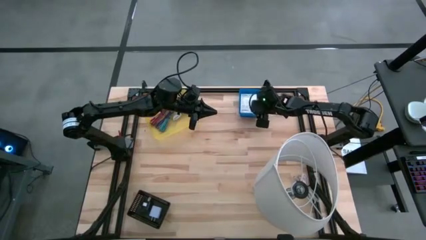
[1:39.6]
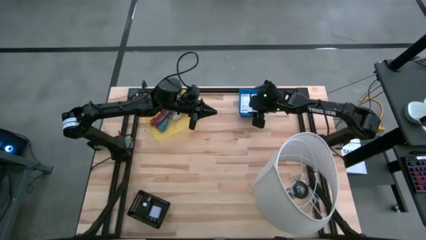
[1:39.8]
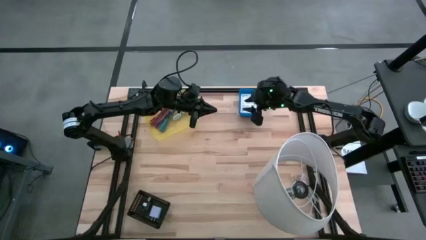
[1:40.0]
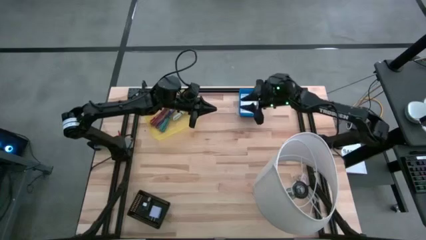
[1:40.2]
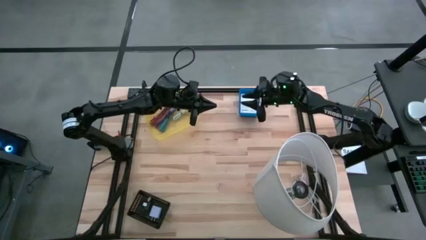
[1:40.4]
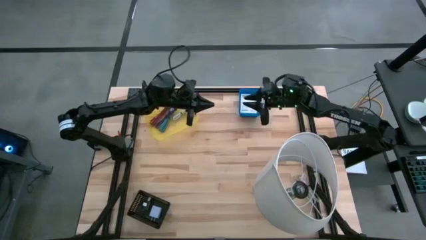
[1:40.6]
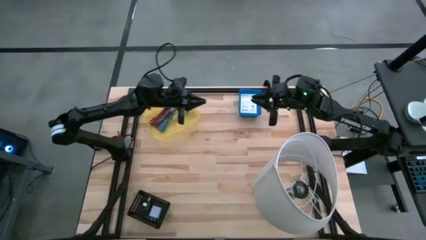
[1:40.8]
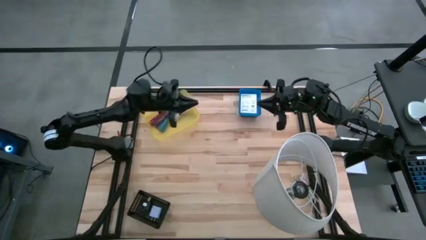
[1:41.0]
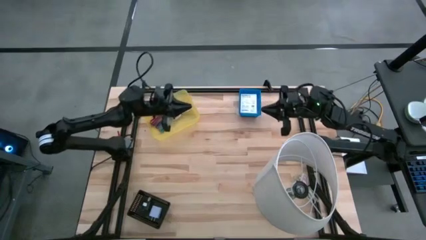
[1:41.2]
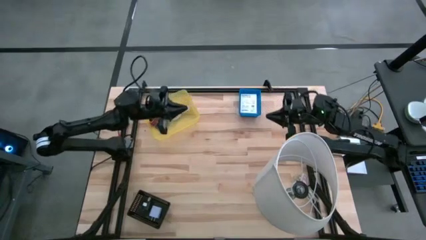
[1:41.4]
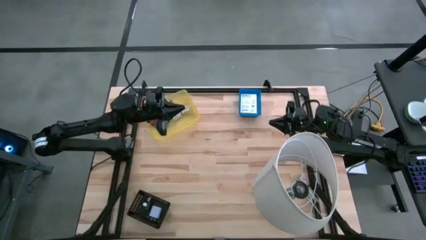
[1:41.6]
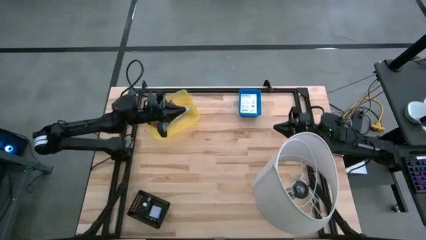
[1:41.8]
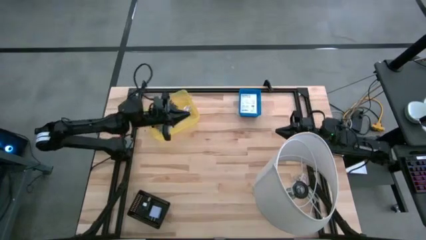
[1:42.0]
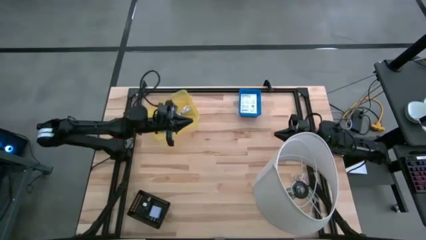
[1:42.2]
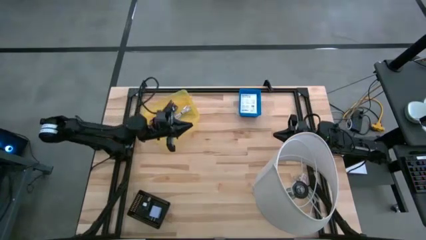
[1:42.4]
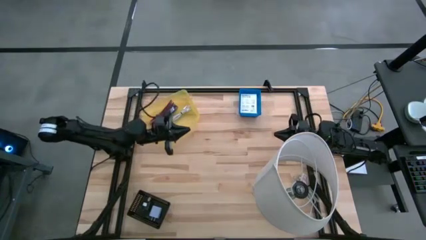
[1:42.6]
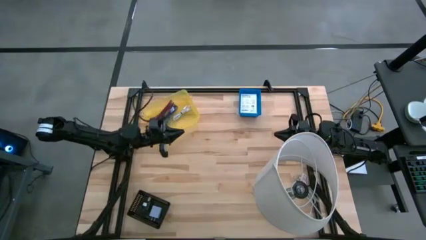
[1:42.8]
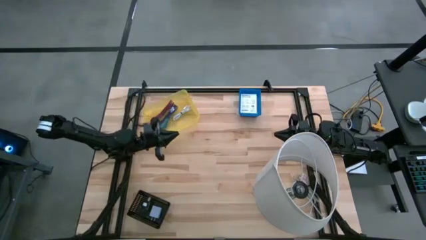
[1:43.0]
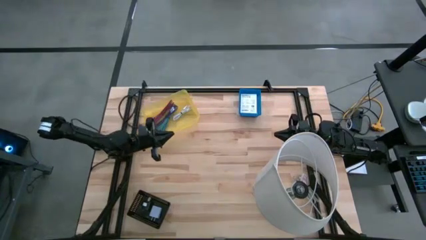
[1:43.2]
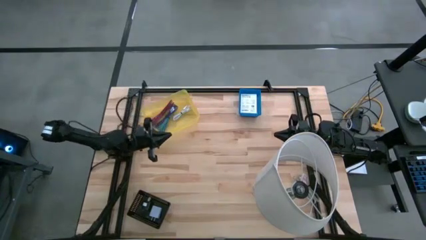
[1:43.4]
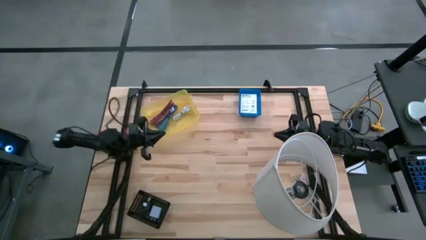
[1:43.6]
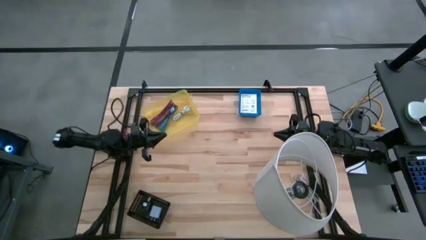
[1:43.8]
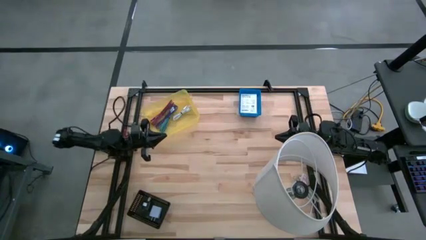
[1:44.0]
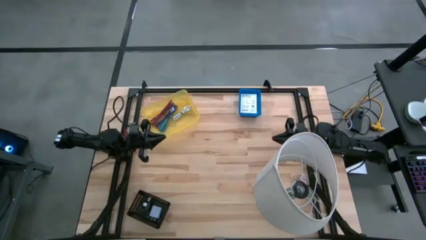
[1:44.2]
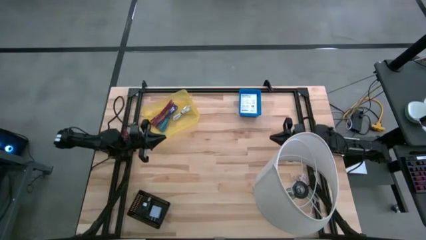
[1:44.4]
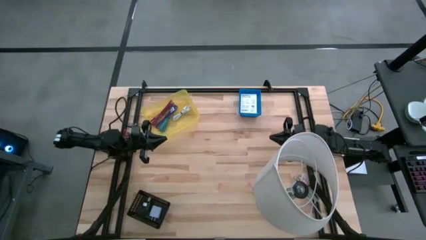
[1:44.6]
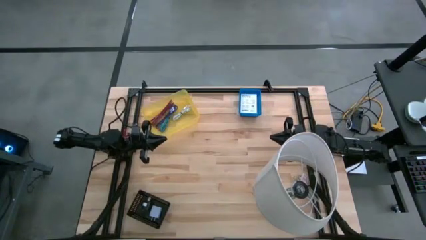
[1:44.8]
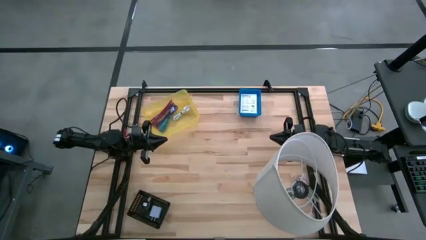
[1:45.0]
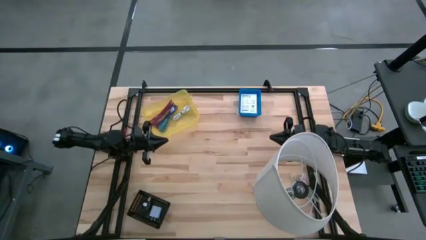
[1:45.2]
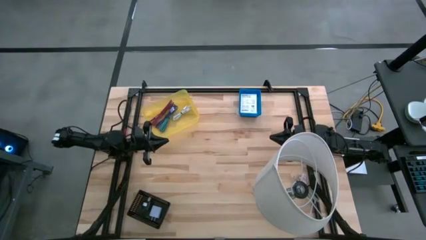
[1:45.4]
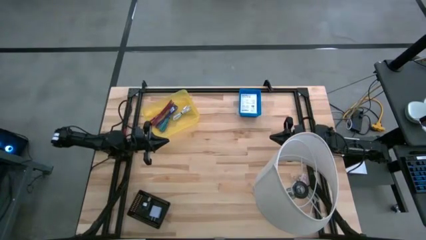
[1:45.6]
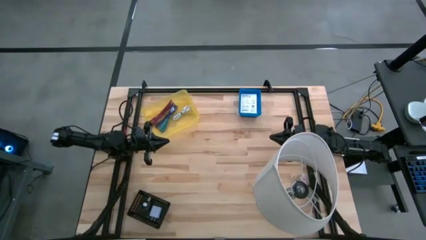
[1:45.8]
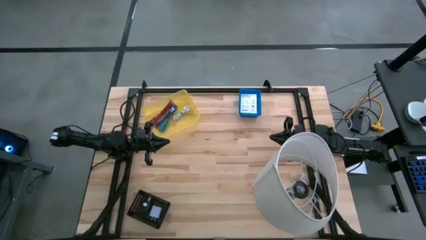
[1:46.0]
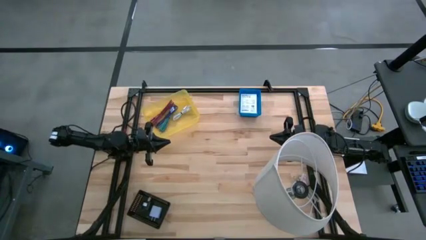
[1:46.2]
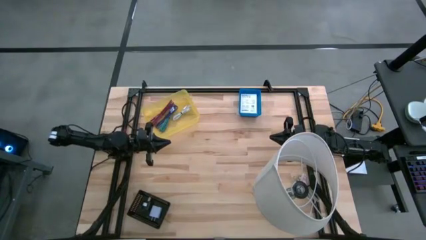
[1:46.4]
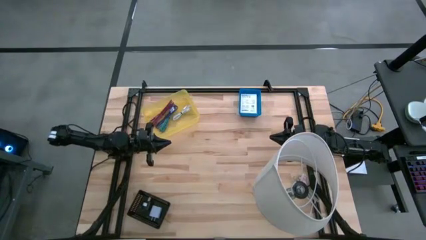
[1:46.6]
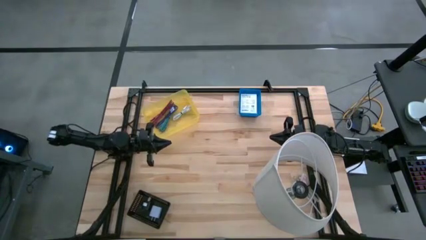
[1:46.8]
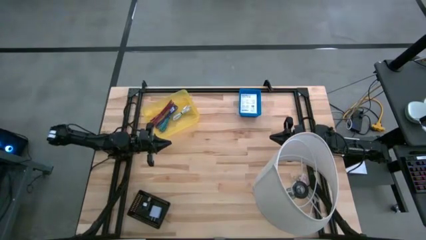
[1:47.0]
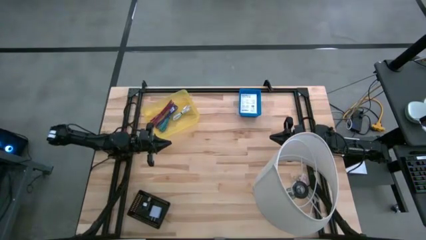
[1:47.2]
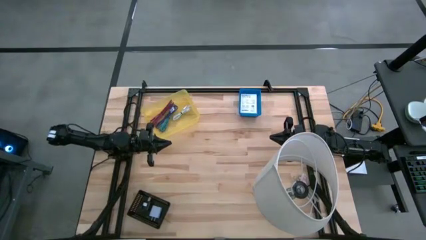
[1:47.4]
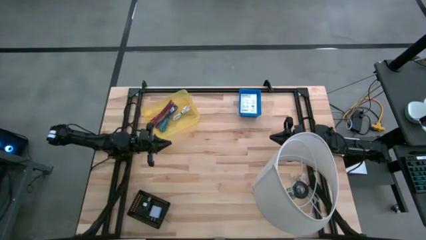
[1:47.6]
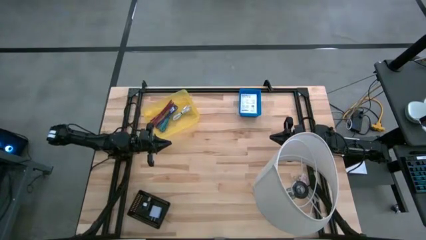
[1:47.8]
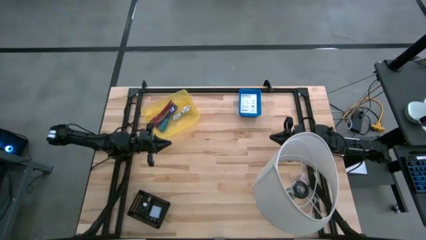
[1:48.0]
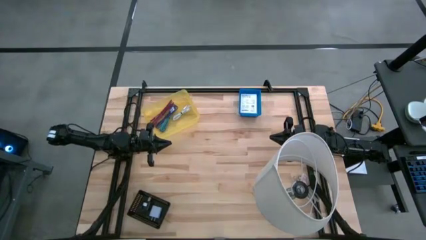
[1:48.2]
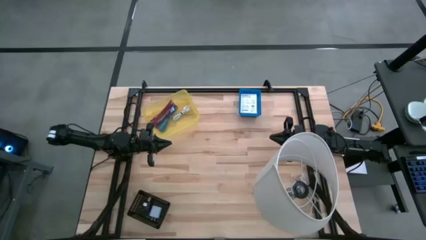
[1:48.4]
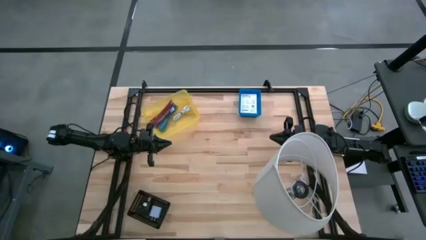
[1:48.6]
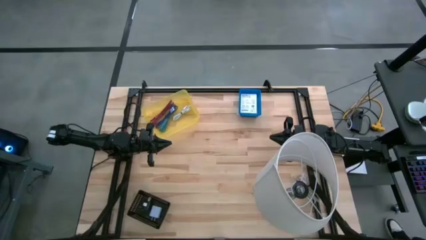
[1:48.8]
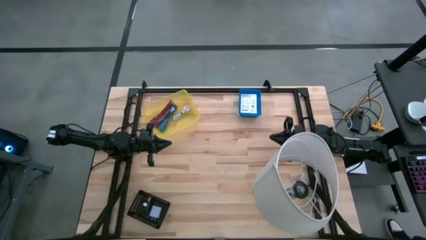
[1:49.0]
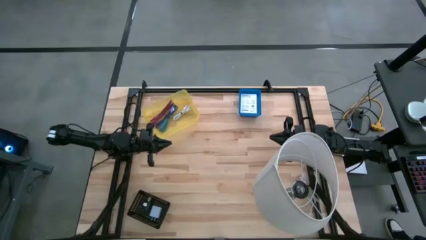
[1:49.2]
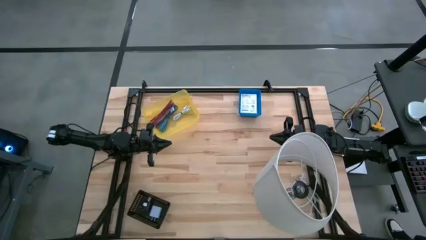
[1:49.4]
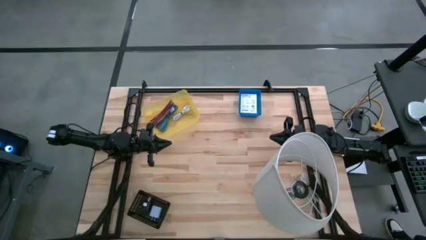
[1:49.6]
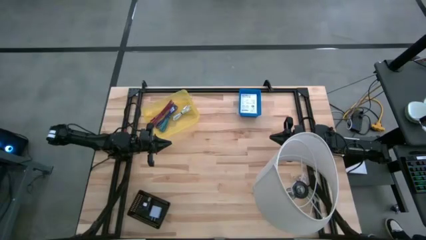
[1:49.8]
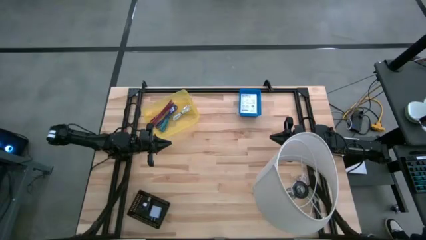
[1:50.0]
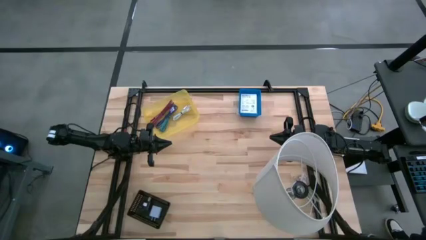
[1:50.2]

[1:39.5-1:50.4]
Task: Pick and place items into bin
Return to Home Position

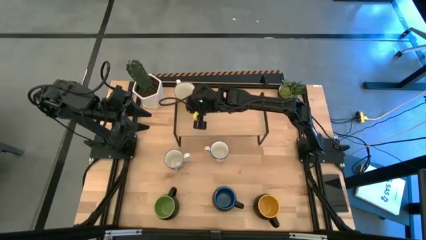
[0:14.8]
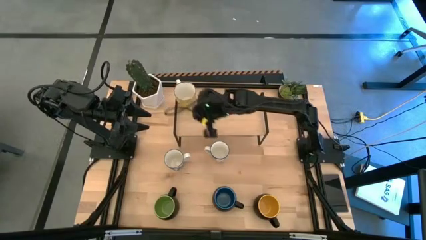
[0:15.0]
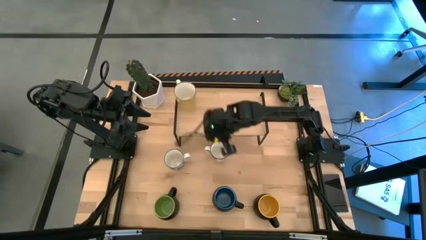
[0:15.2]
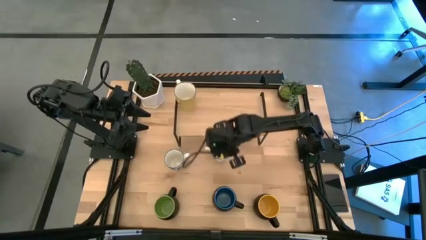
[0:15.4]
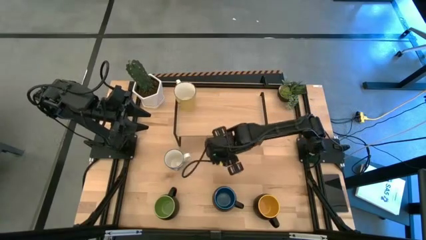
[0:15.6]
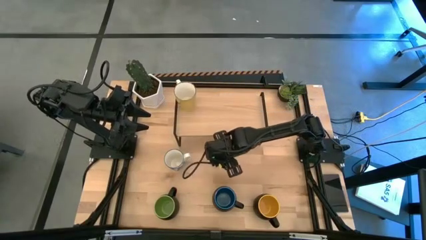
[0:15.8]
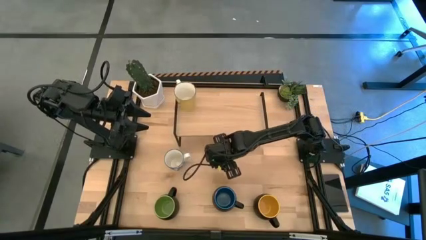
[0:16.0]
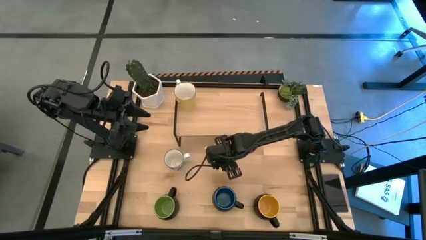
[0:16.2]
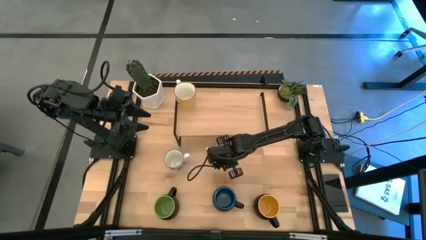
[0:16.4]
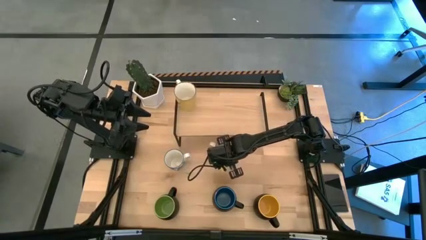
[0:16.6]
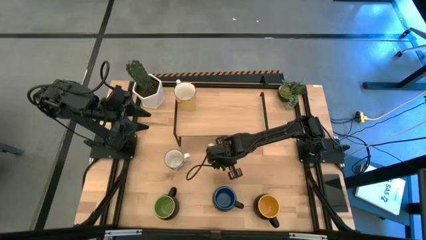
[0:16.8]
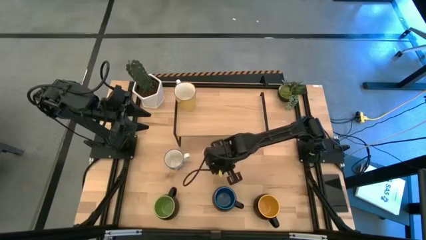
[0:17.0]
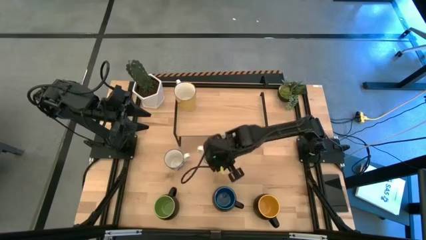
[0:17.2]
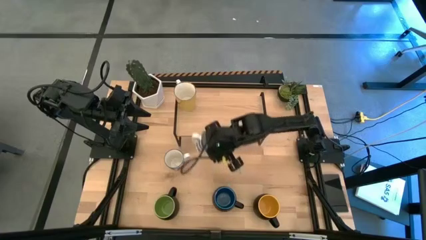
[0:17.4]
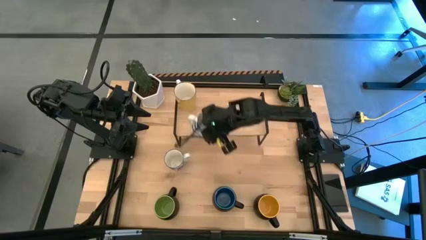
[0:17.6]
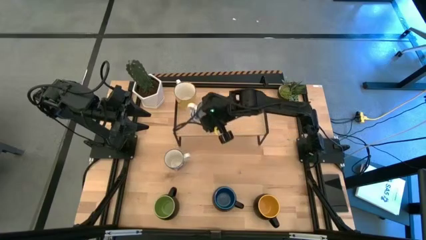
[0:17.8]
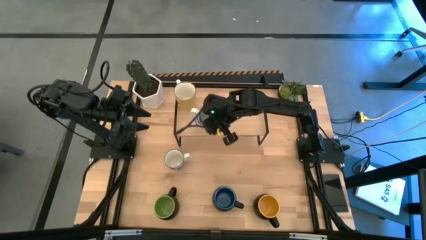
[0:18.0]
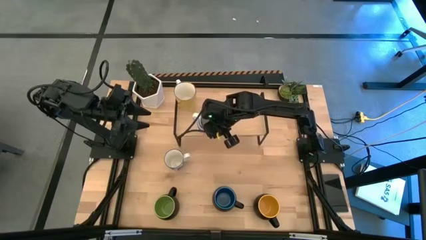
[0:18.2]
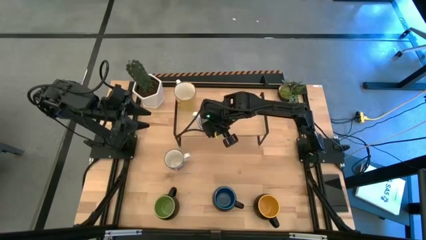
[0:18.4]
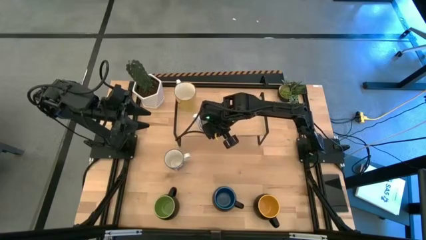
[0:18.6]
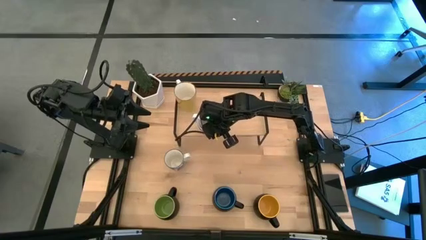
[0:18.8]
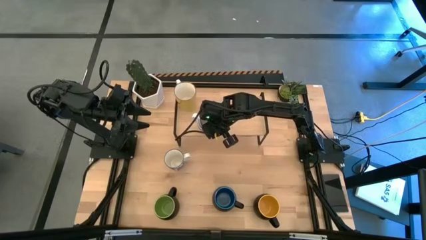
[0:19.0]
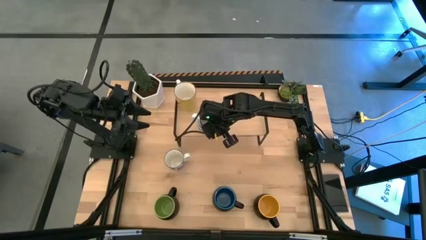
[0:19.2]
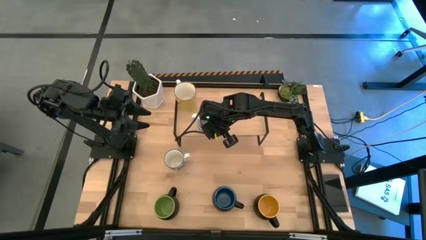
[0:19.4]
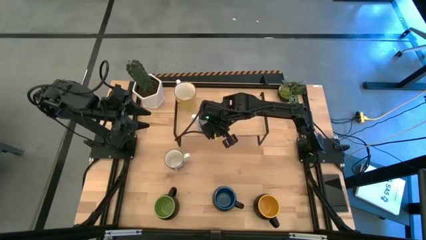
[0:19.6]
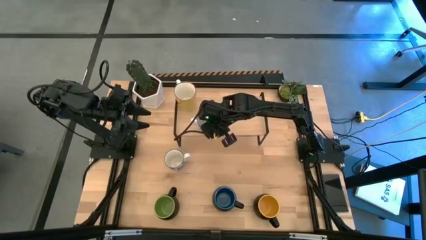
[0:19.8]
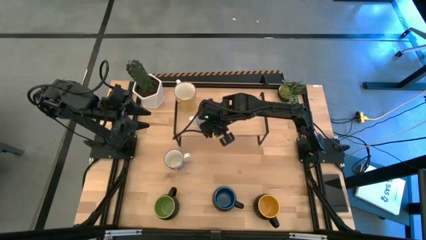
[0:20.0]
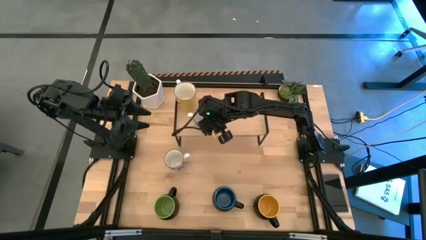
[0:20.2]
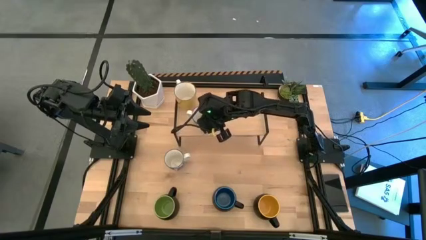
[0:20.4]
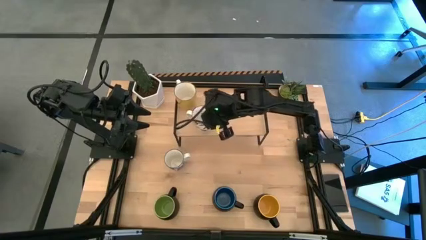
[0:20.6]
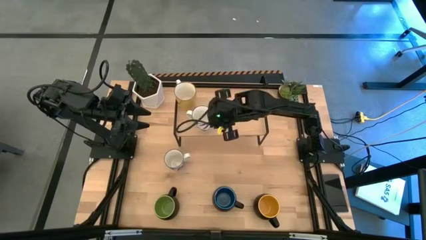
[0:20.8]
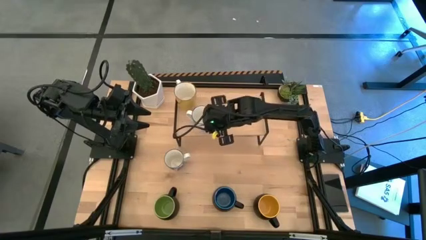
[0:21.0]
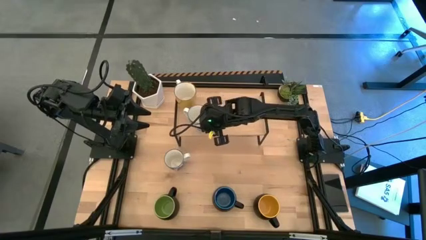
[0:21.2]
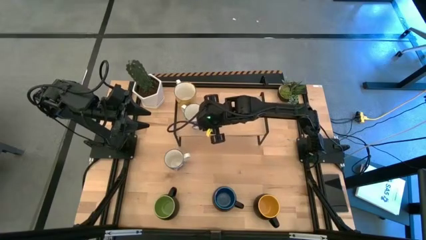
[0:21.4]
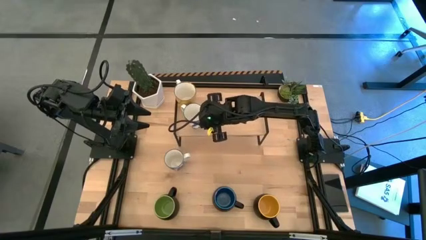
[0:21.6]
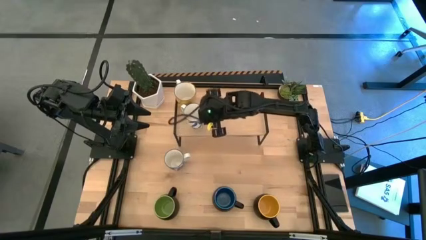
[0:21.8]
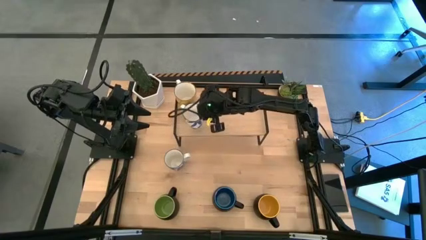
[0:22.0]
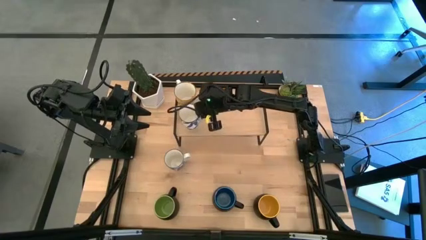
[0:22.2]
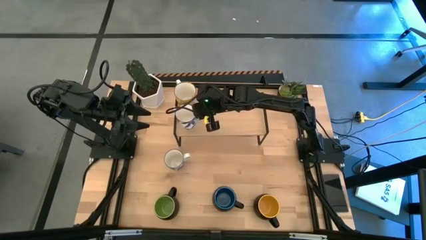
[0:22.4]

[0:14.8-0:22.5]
Task: Place coffee mugs
Put the right white and blue patterned cup on the shelf aligned with the other yellow cup
